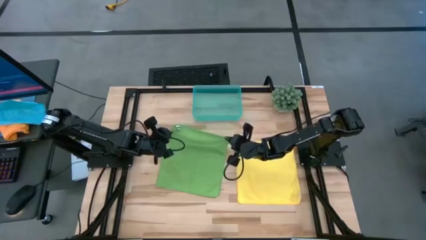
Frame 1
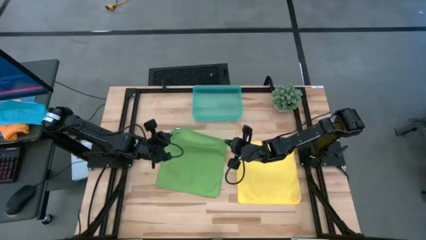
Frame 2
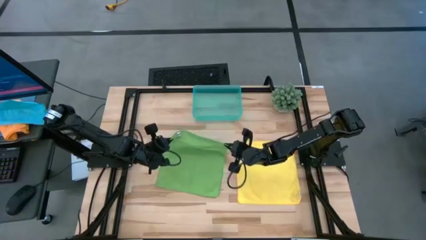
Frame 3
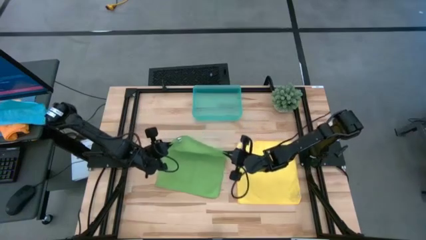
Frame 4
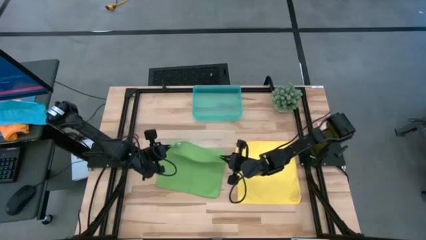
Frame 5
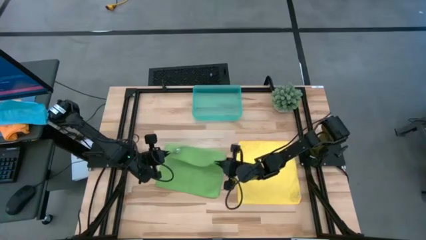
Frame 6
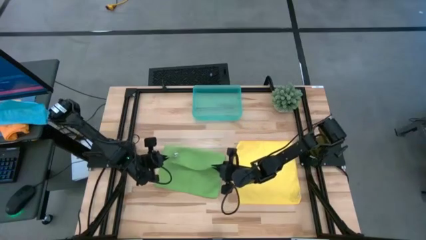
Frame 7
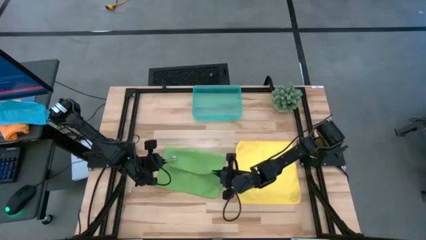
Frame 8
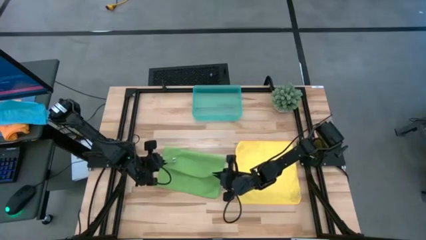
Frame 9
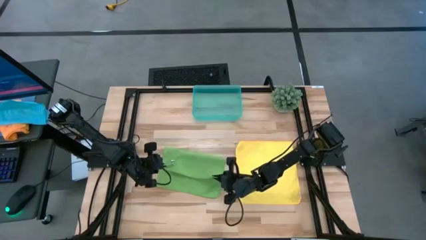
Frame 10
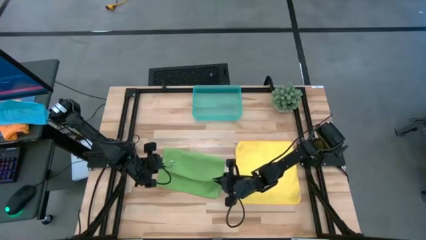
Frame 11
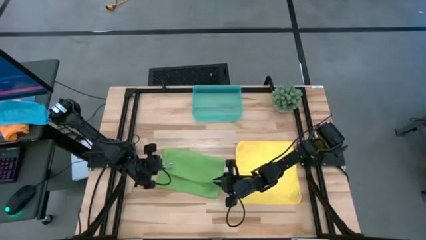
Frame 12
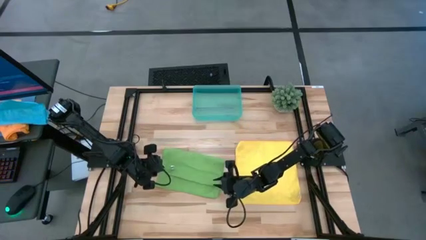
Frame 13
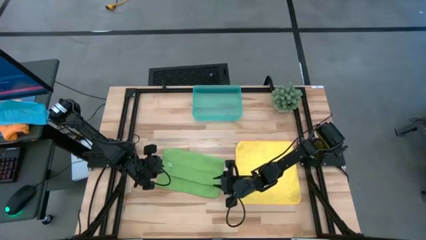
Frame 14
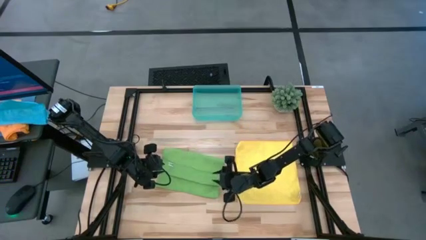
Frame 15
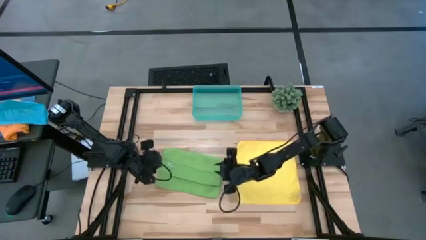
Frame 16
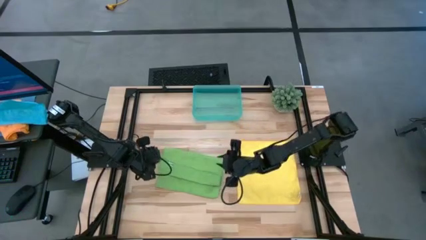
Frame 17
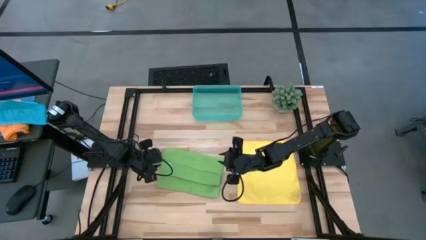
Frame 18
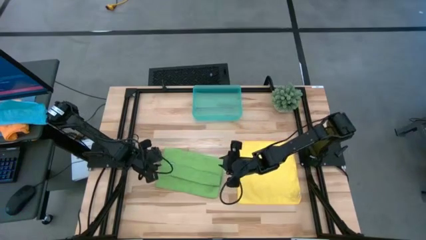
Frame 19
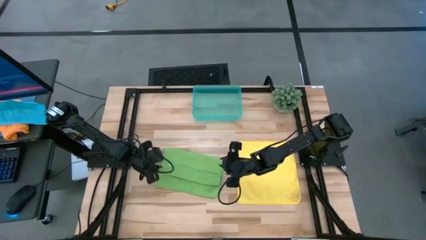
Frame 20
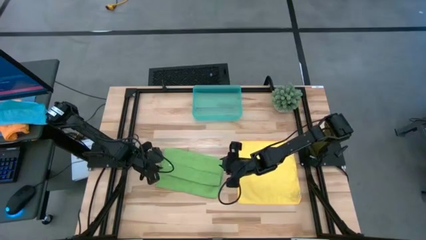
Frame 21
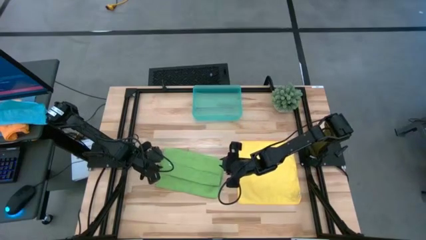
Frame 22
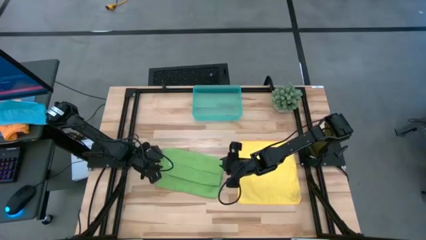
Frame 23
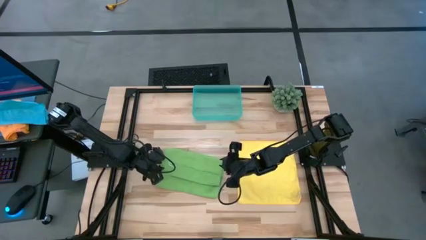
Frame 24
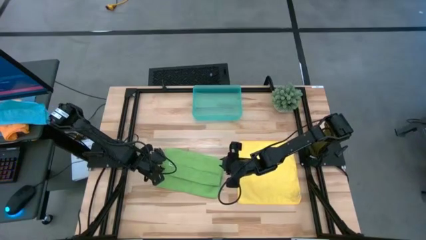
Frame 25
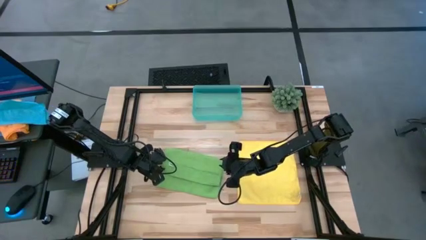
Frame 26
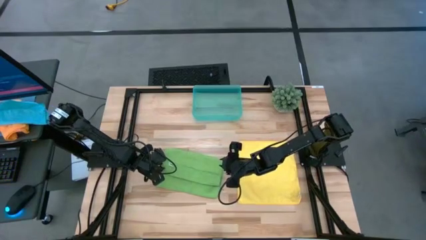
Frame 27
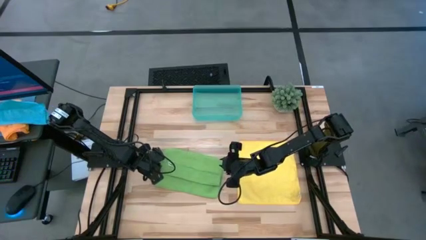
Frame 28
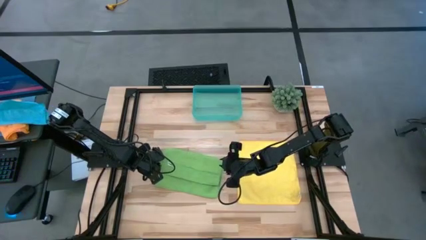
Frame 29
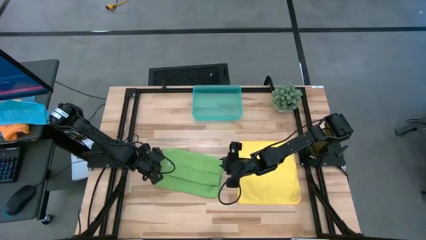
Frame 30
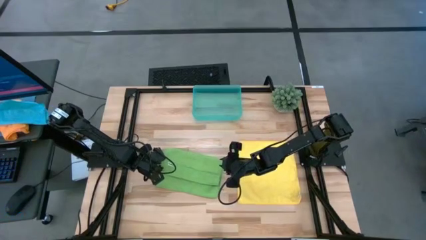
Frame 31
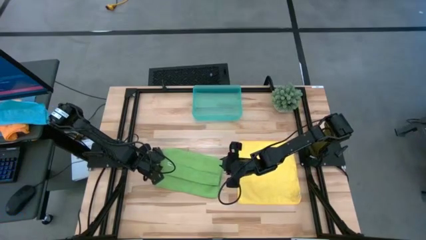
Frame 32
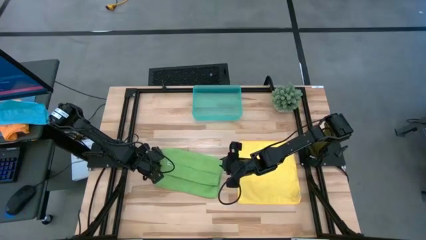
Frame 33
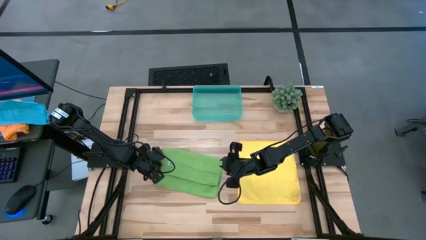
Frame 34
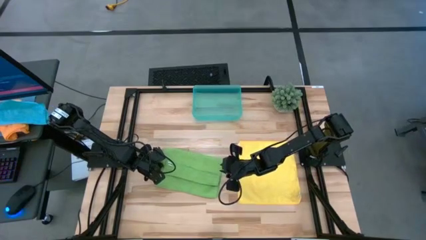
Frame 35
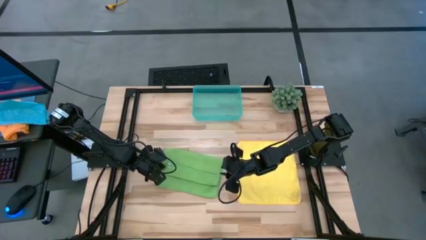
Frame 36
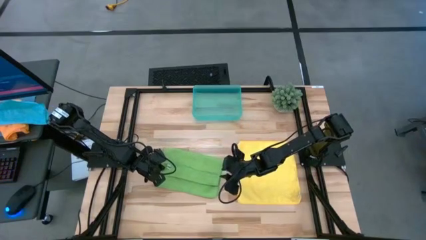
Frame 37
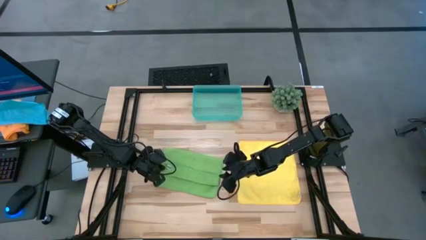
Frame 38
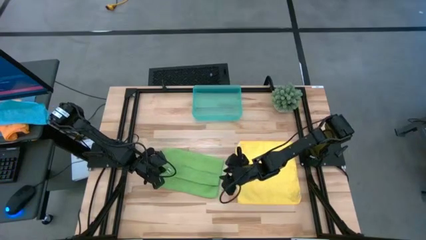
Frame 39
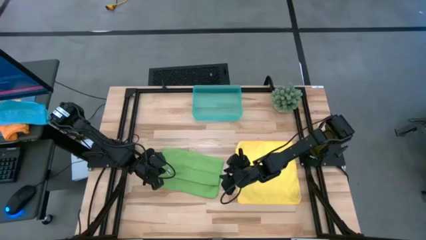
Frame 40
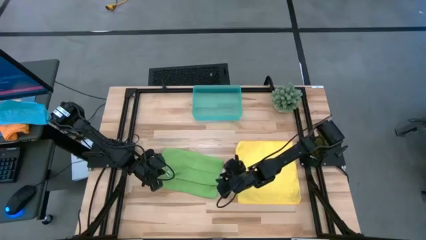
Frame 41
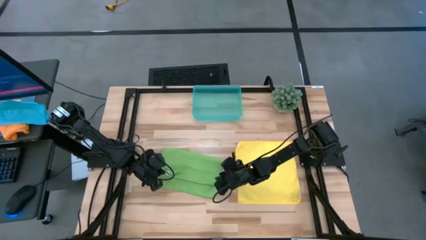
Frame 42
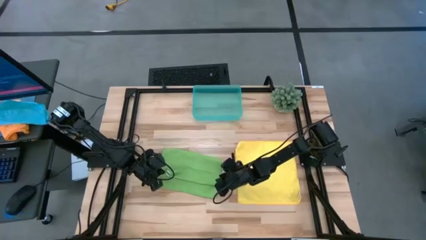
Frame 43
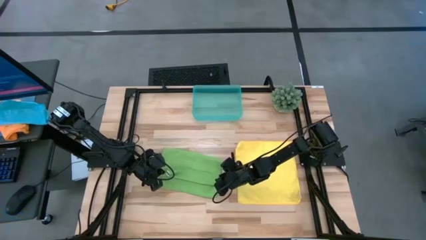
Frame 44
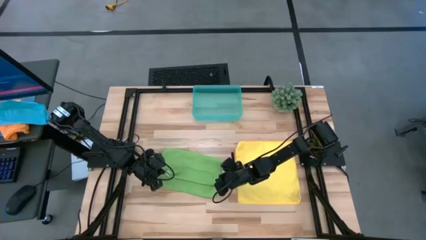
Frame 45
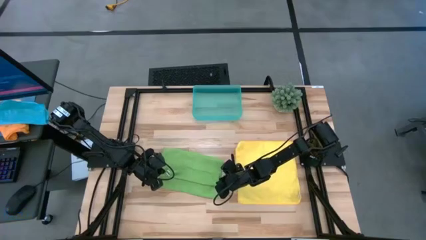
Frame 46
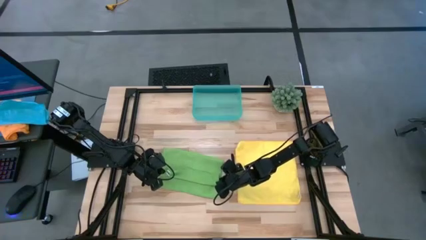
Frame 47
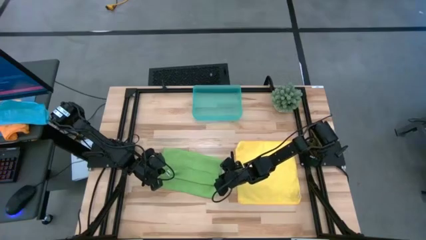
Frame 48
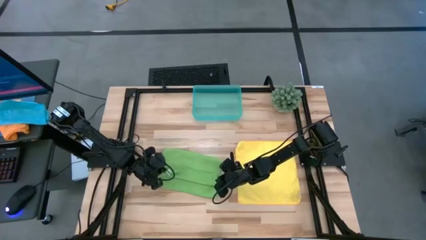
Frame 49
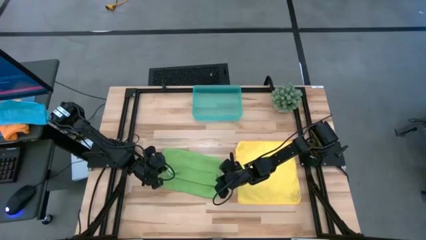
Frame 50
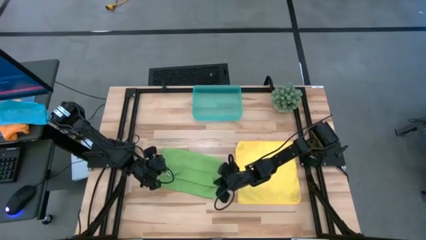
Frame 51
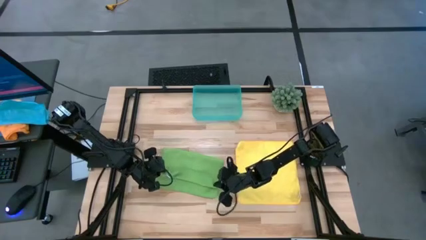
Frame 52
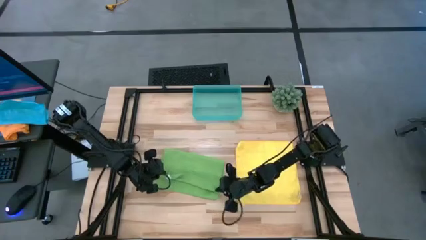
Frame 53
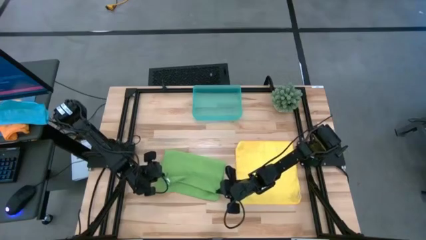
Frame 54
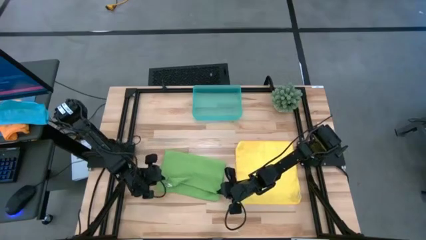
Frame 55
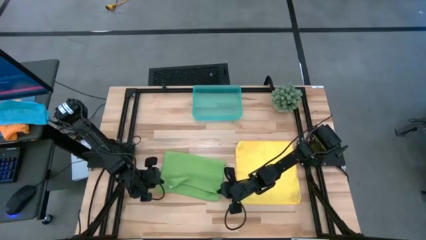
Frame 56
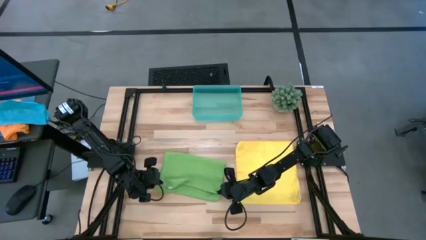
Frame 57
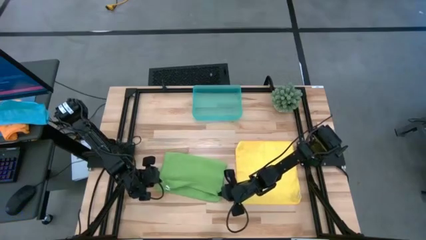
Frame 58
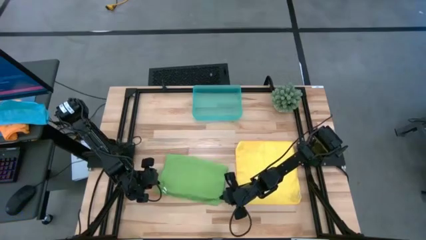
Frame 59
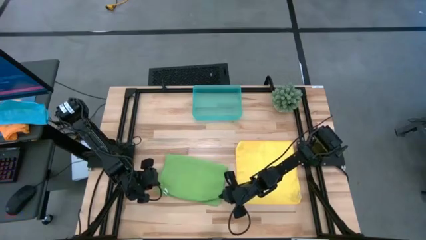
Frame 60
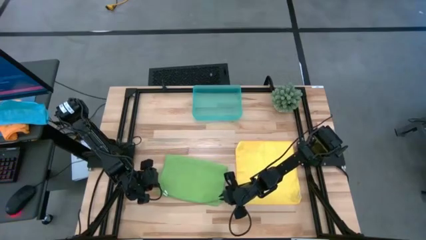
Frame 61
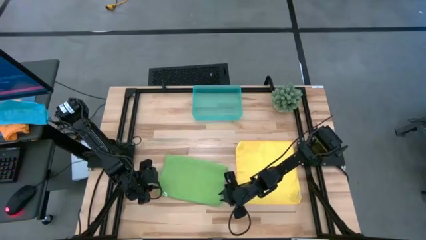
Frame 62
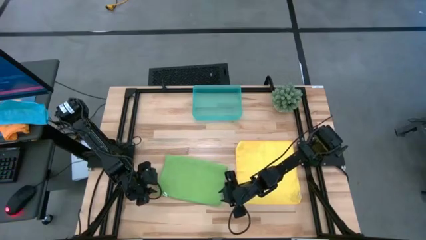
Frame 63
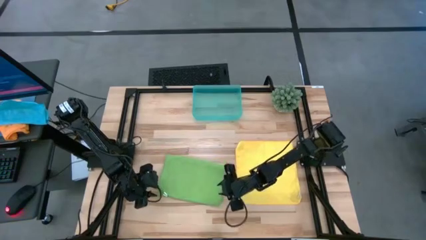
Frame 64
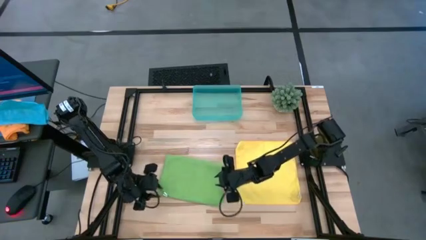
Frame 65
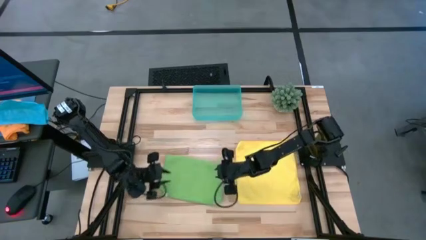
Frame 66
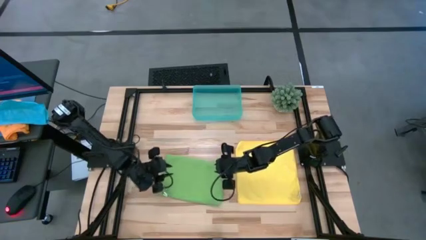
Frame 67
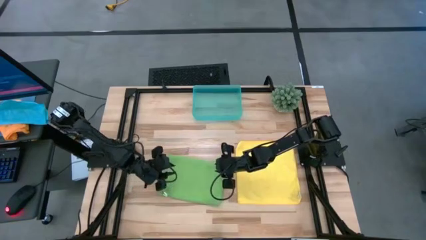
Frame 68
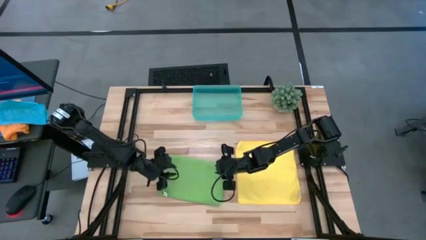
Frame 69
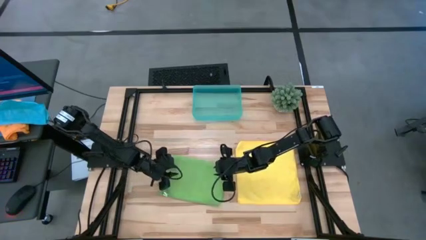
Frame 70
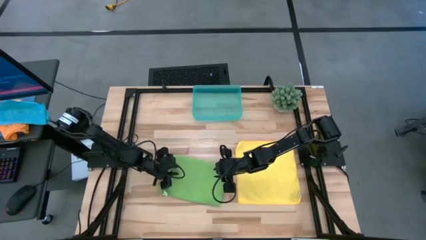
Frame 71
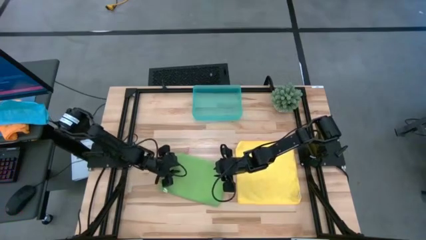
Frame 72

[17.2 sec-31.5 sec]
Task: Roll microfiber towels into tight, uniform cylinder then place into a basket
Fold the green towel
